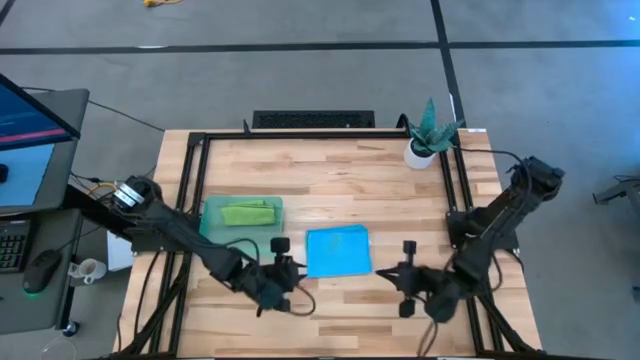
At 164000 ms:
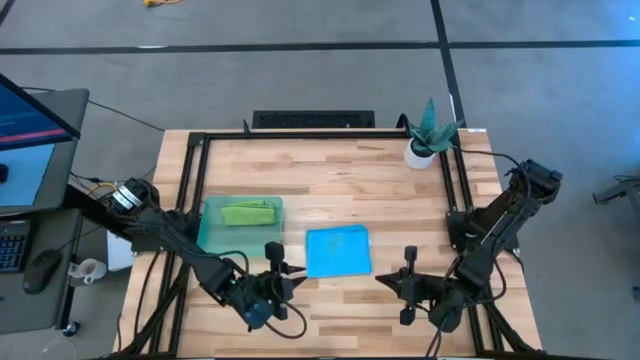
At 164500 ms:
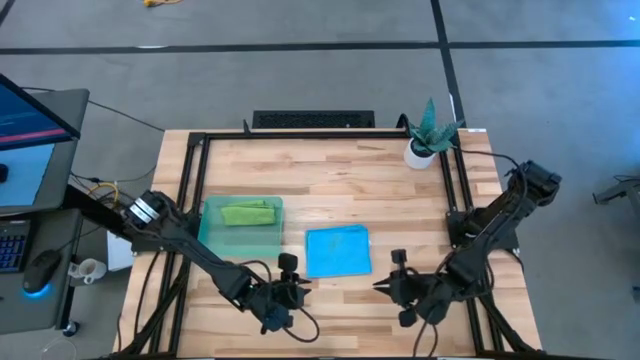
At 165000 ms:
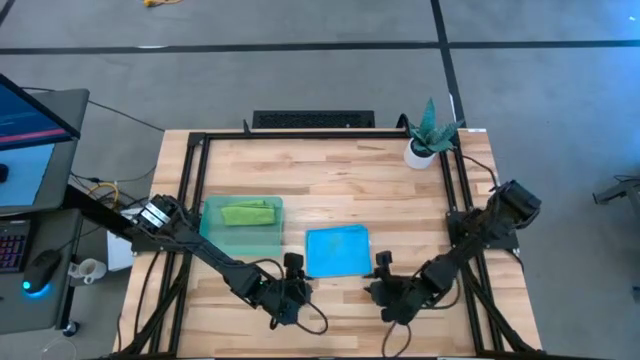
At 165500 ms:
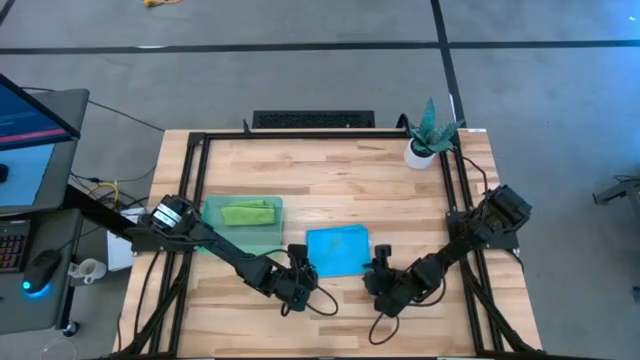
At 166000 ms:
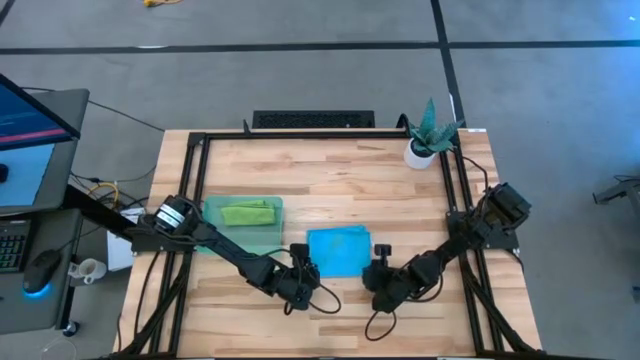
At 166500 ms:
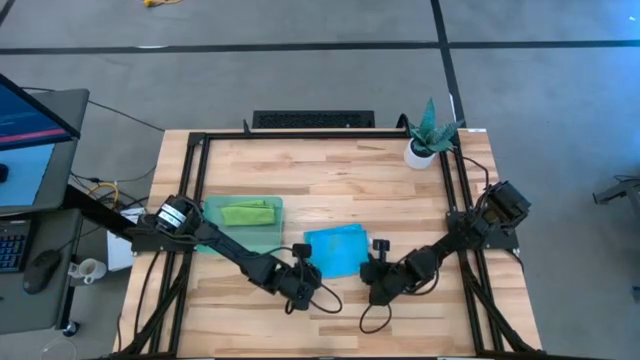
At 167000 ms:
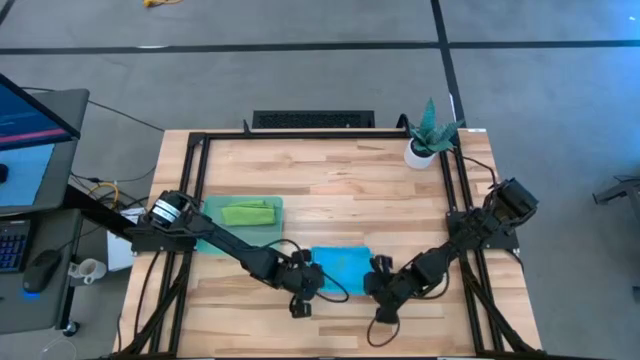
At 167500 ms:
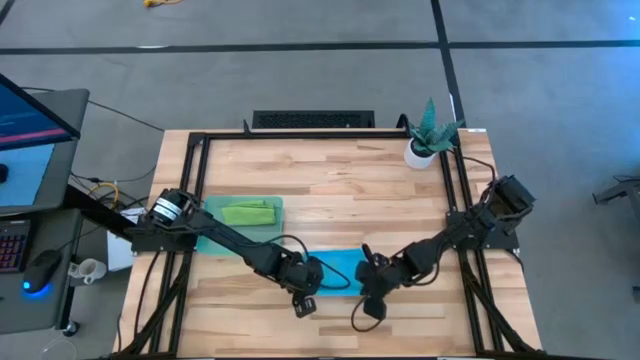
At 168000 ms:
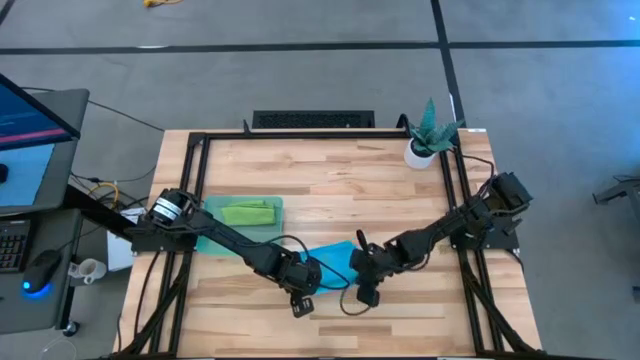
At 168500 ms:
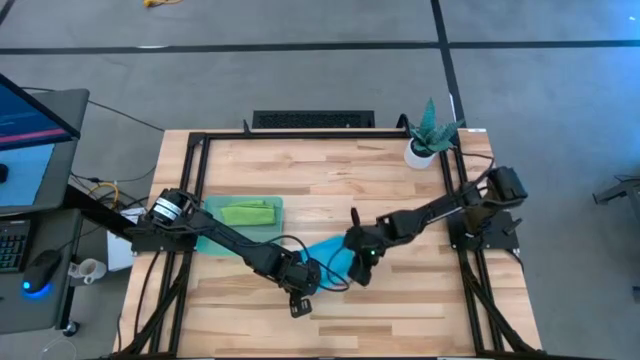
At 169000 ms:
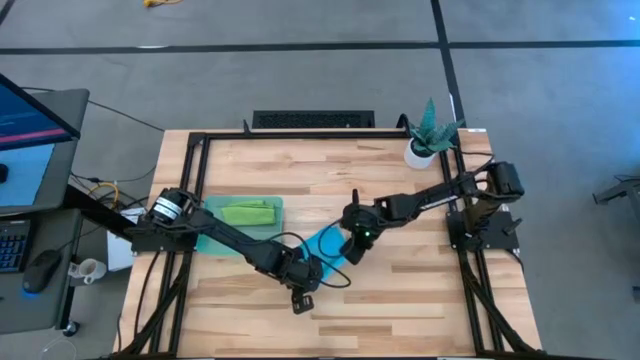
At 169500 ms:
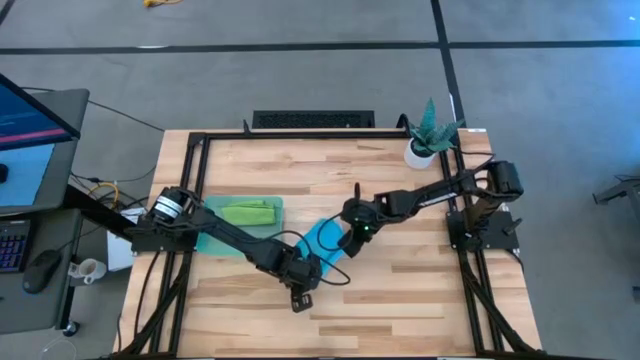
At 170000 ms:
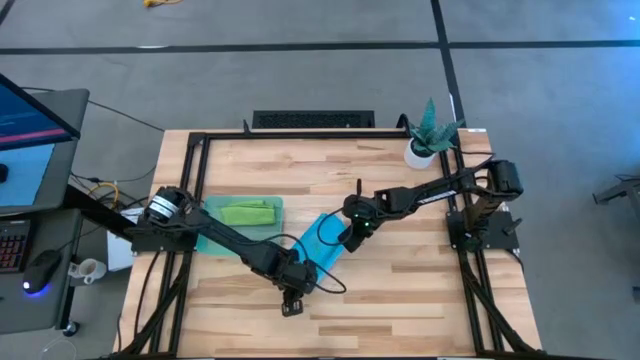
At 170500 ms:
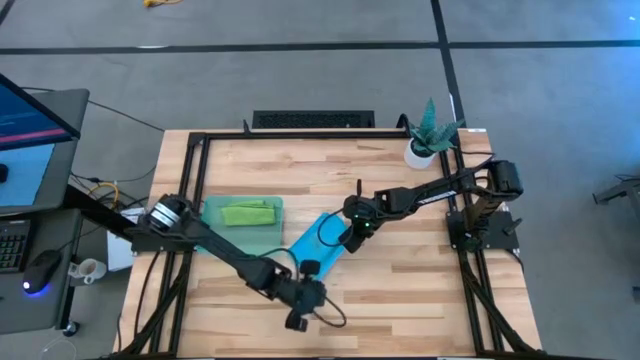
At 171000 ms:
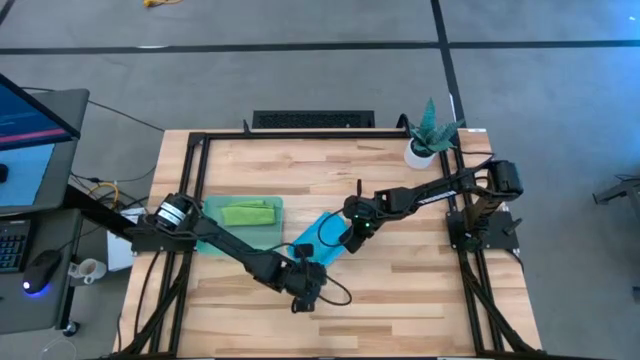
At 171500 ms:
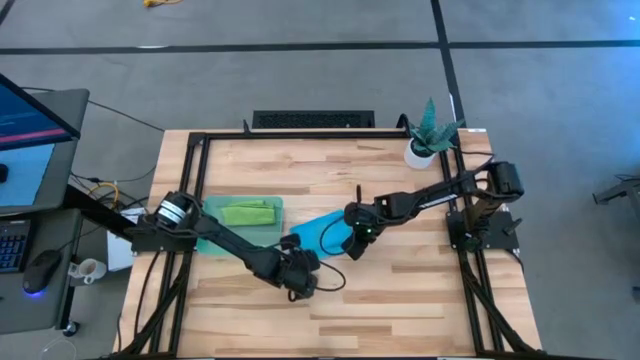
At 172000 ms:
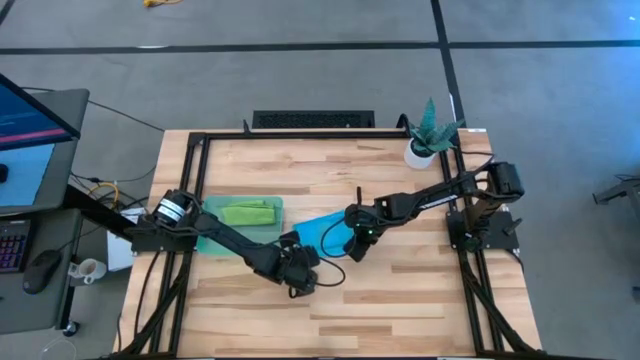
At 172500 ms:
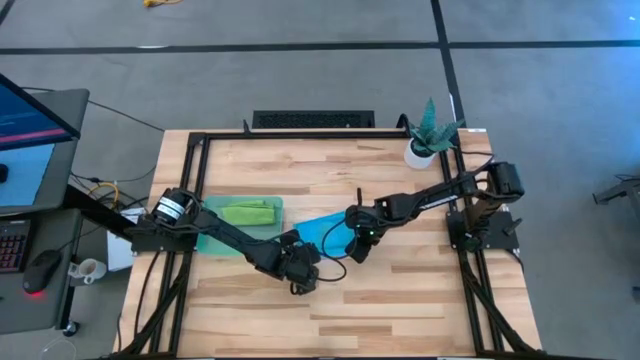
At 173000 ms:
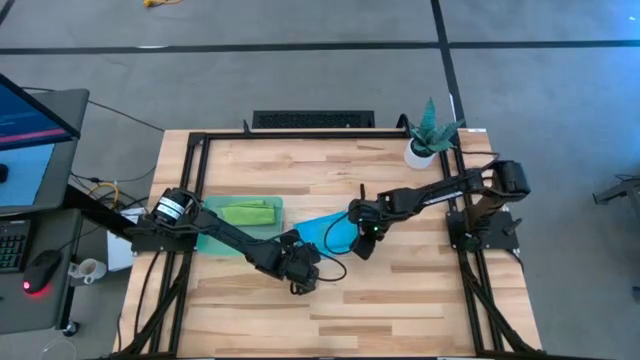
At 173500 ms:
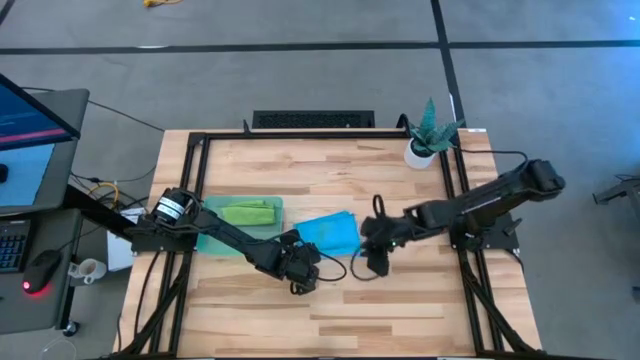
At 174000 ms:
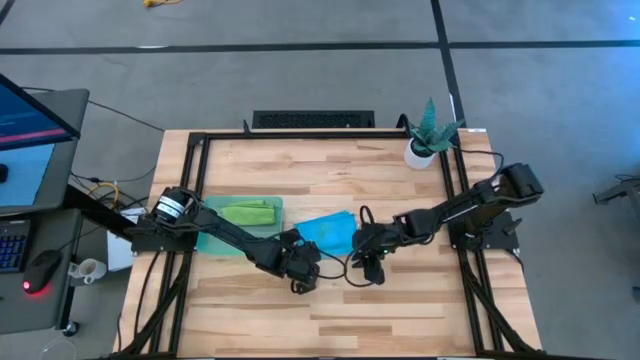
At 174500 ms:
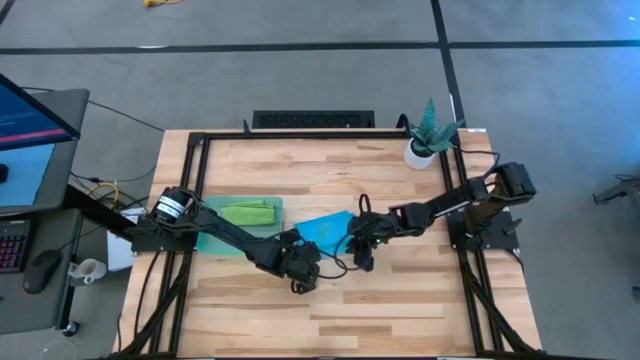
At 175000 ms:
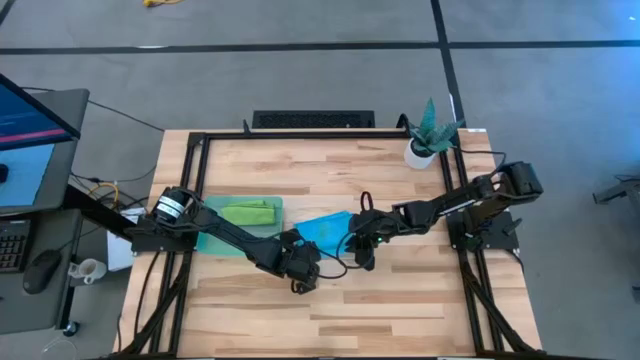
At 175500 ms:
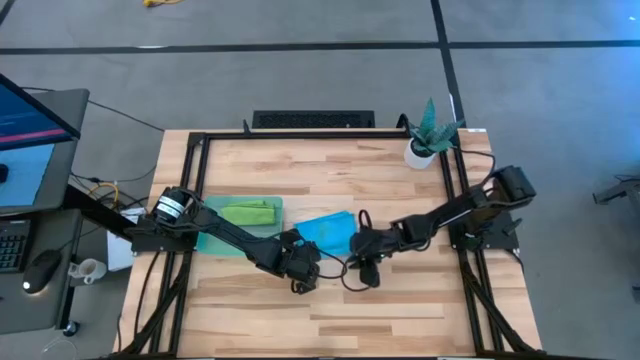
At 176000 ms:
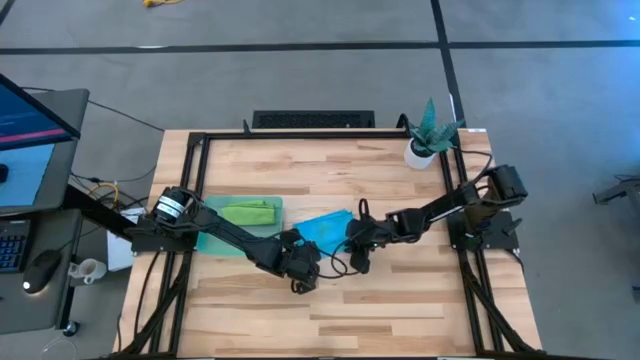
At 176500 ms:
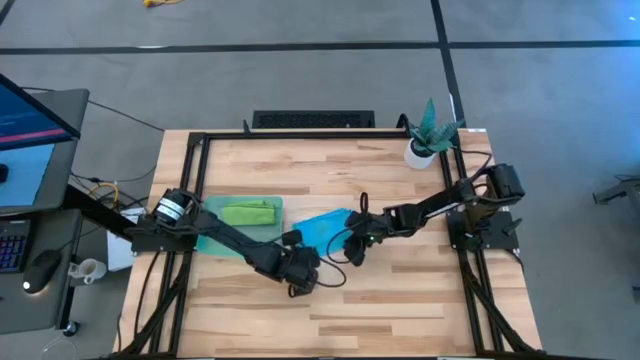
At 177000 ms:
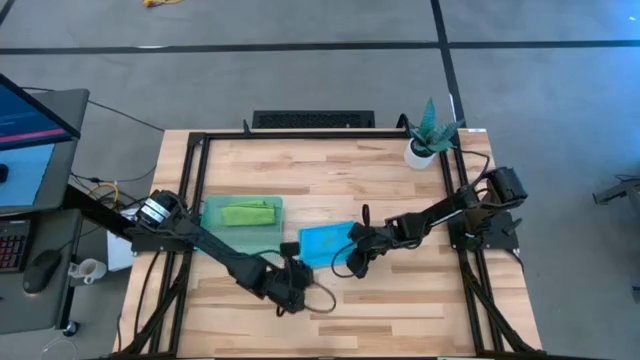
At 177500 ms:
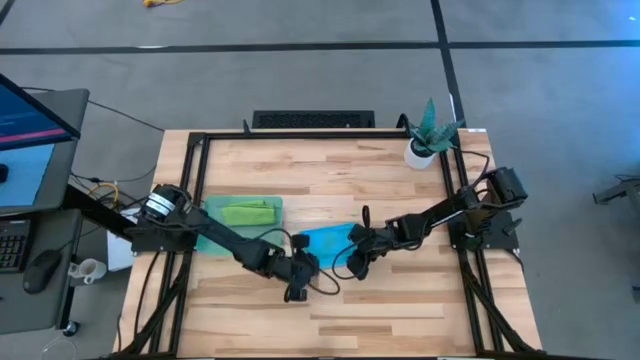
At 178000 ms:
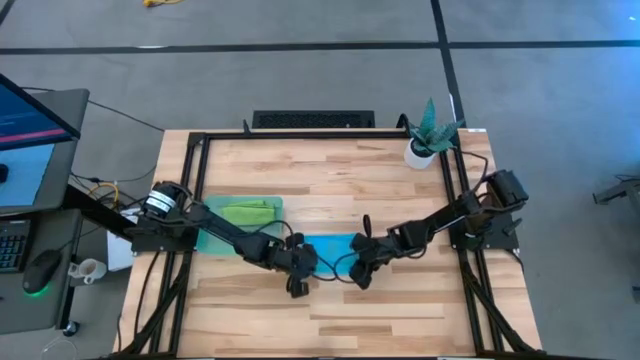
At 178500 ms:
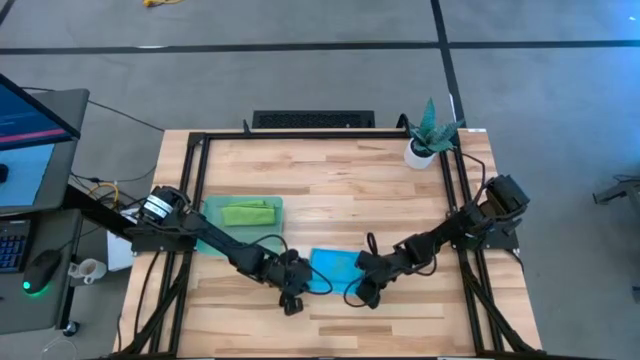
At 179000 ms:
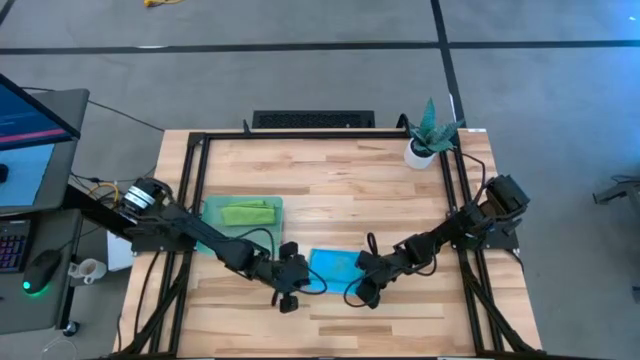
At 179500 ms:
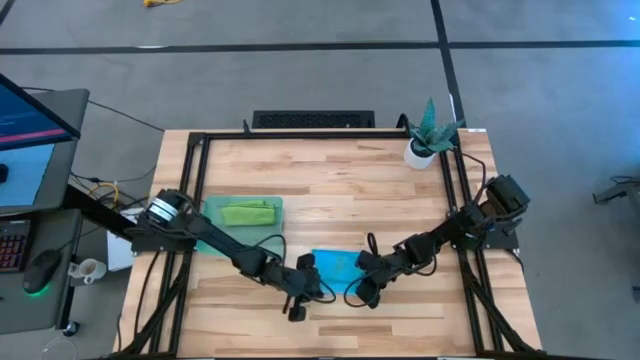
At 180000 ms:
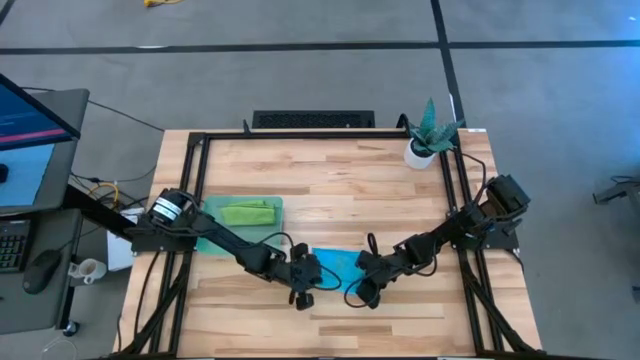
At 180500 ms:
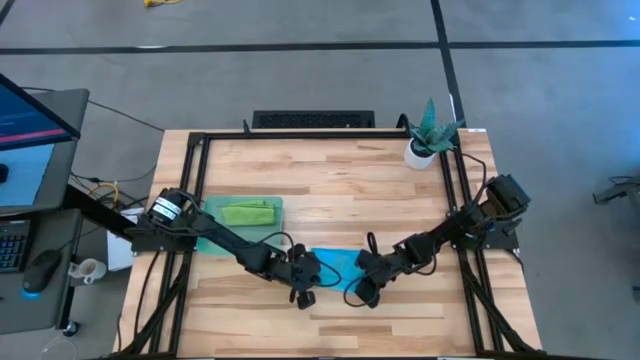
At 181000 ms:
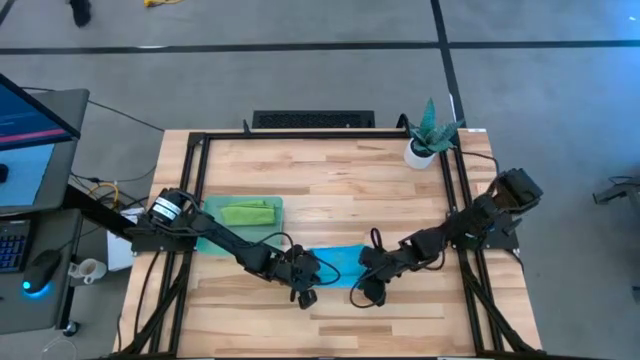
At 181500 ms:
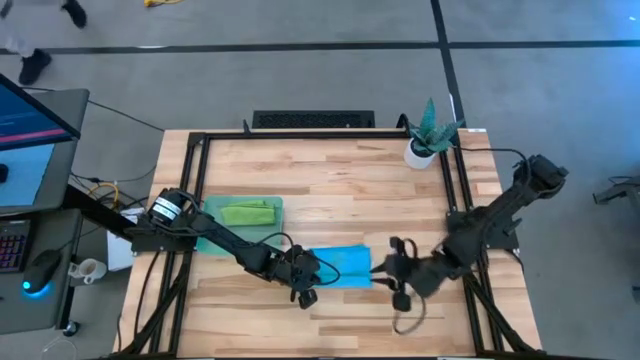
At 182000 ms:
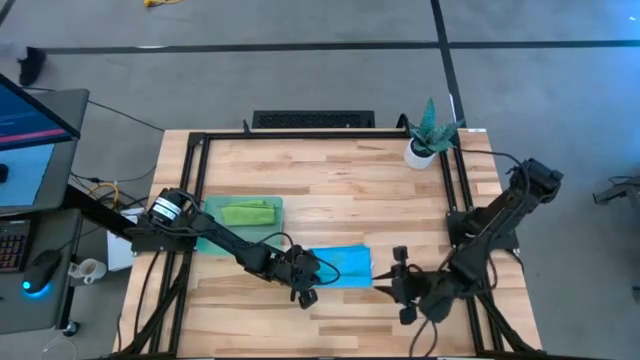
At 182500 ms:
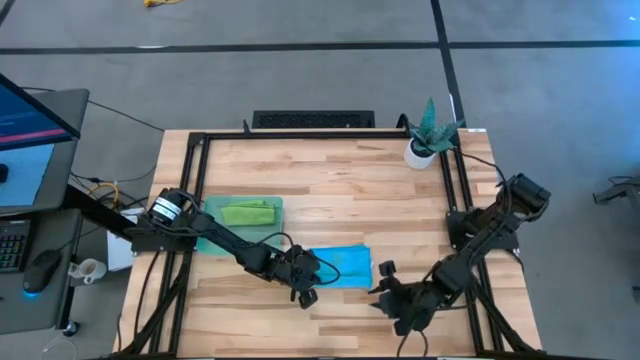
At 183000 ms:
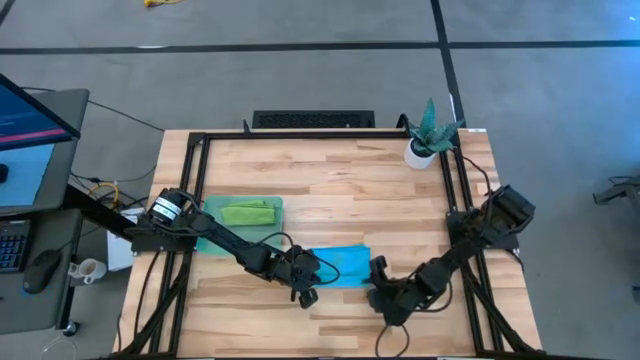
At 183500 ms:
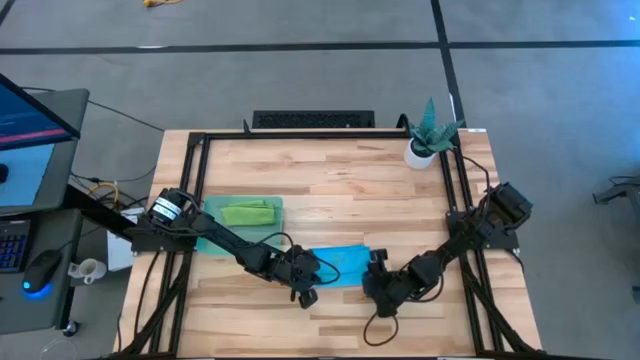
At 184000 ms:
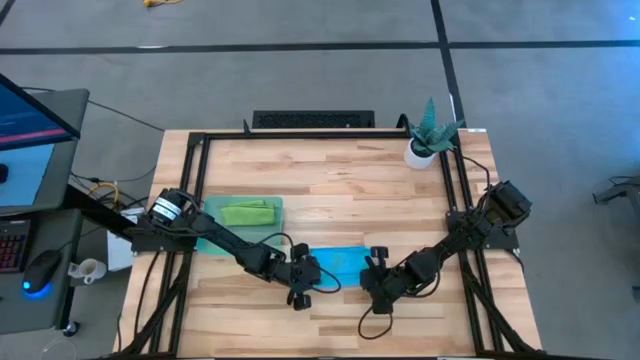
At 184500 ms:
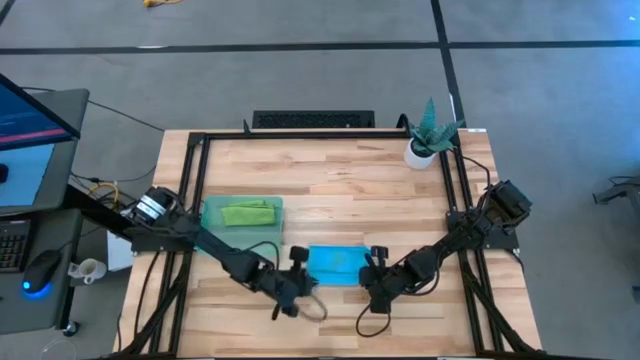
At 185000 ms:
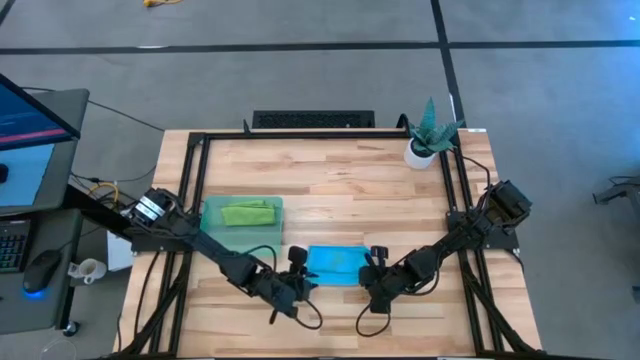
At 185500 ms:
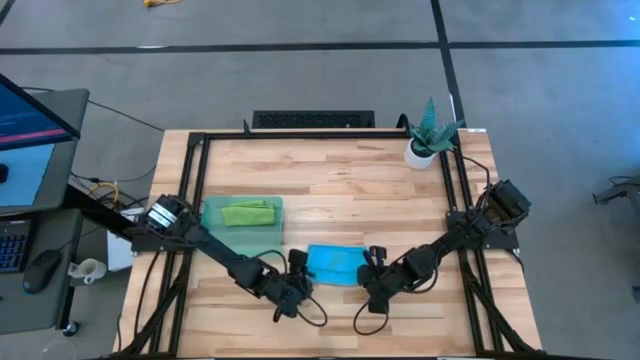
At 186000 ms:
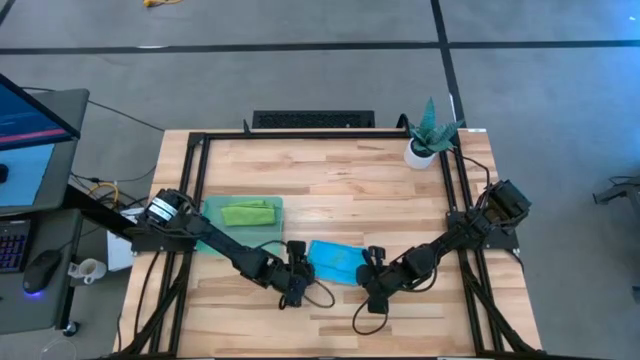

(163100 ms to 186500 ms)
Task: Roll microfiber towels into tight, uniform cylinder then place into a basket
Roll the blue towel
